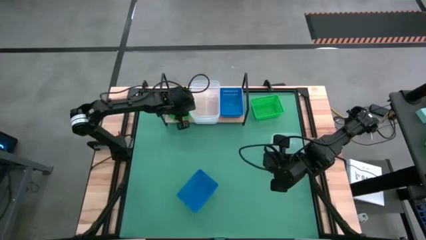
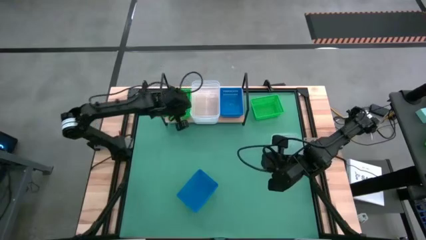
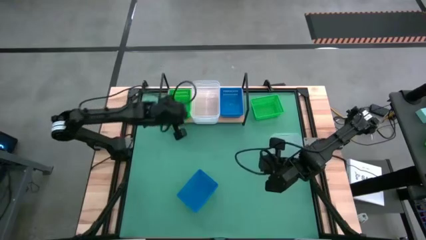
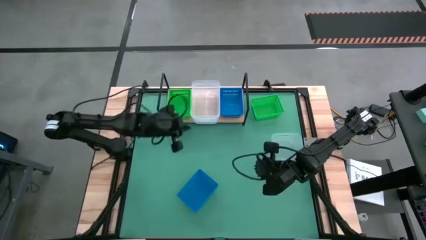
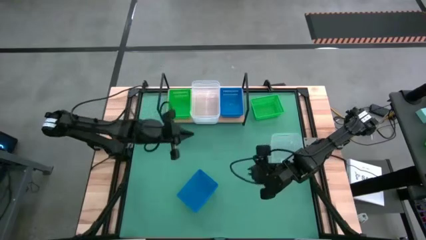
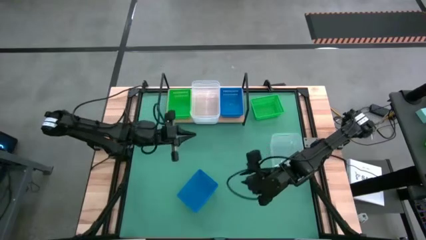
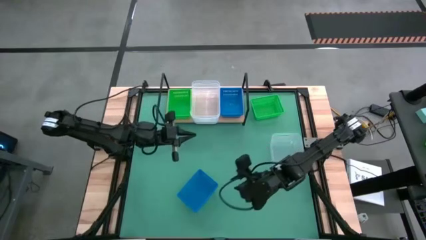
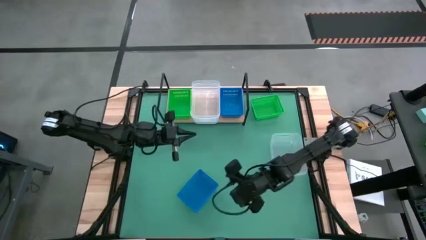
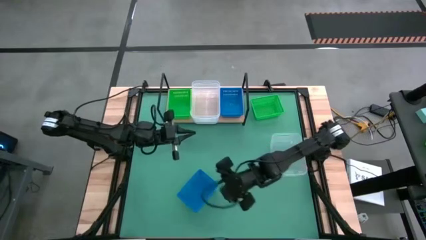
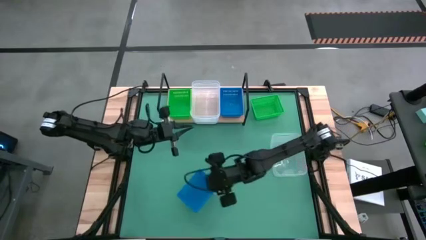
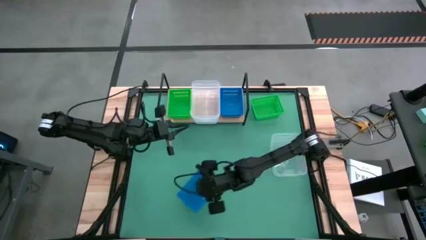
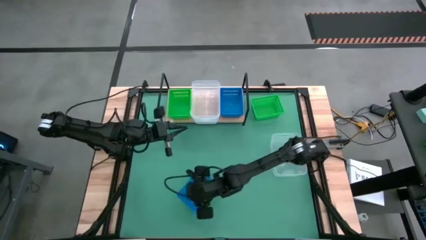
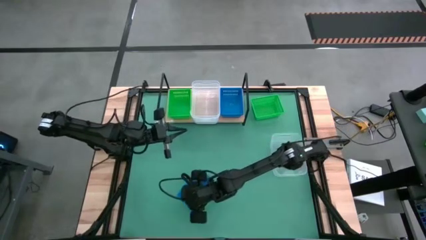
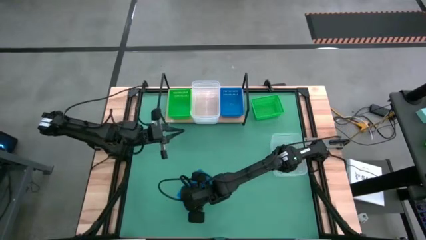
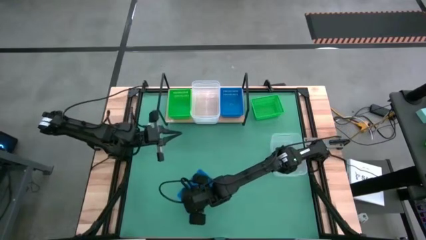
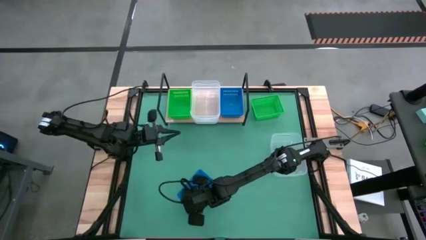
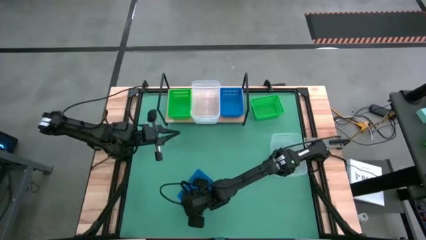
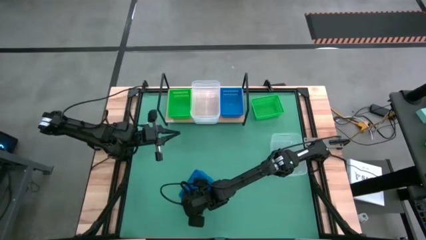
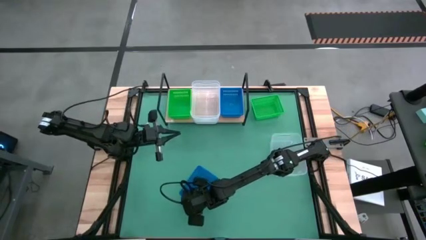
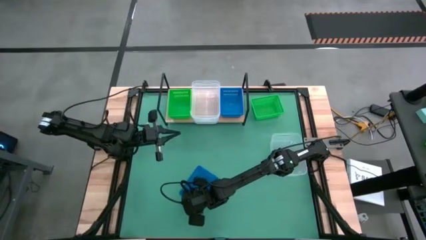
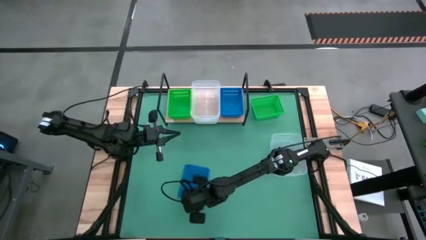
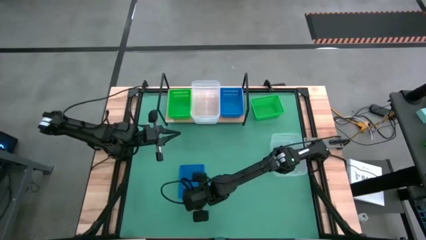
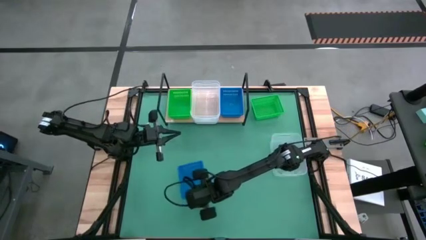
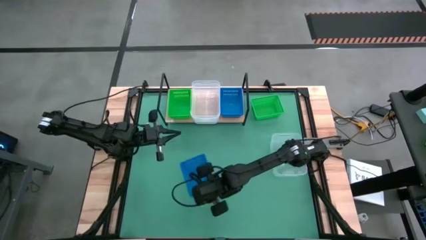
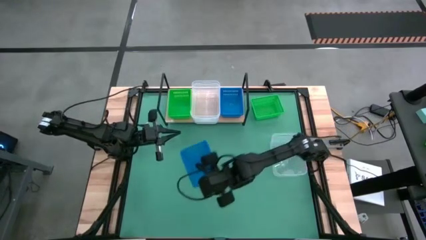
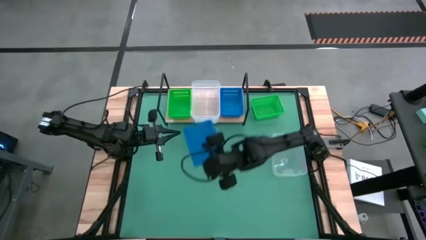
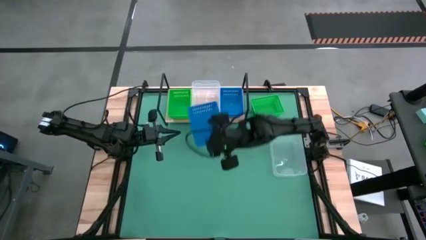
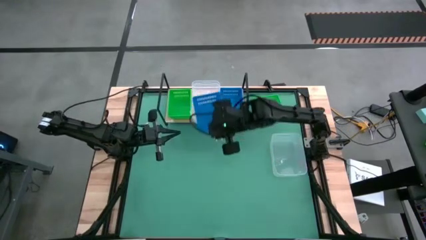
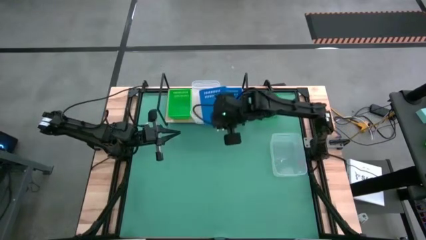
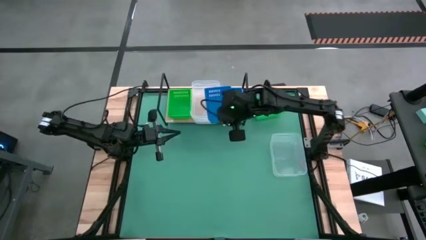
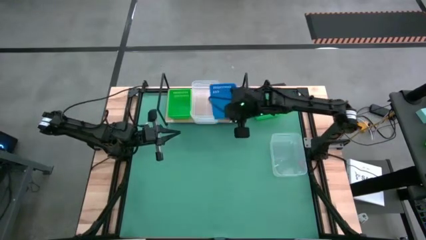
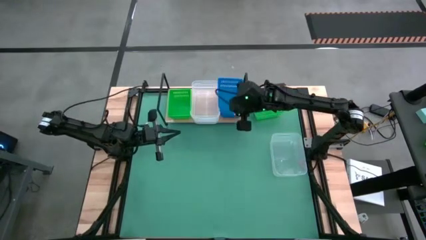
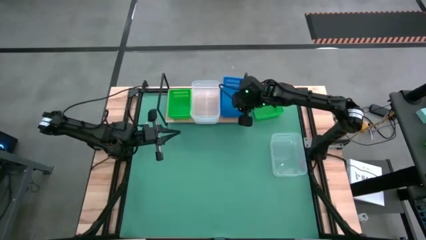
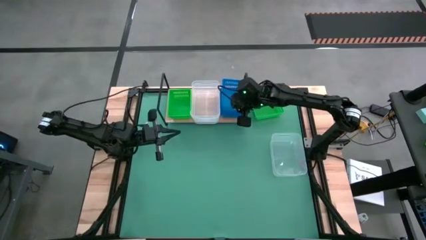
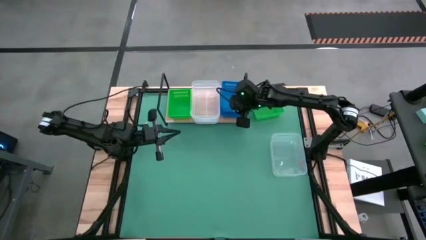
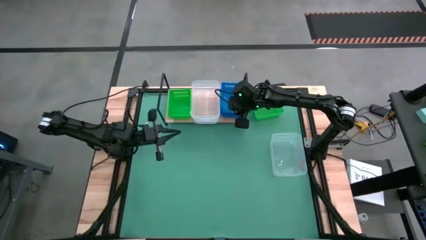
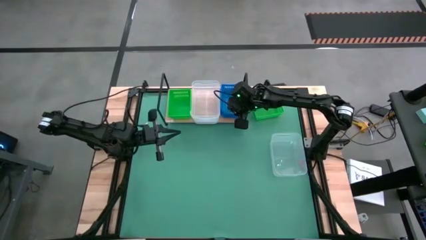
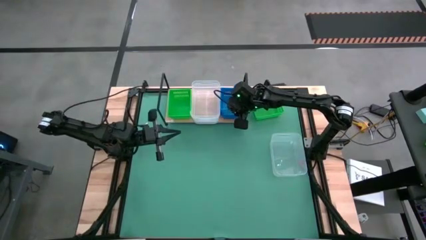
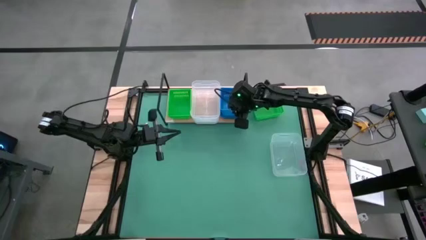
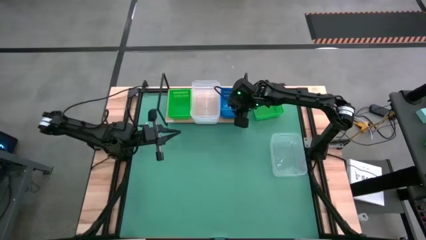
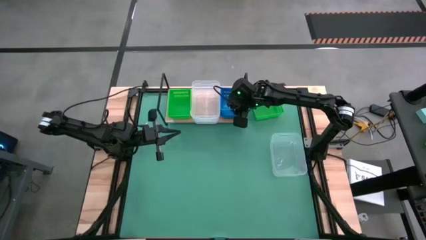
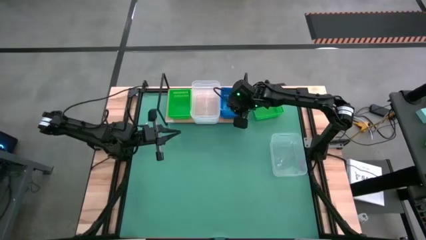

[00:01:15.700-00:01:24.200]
Task: Stack baskets on shelf by color
Stack the blue bin on the blue bin on the shelf

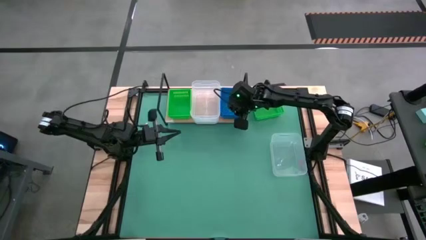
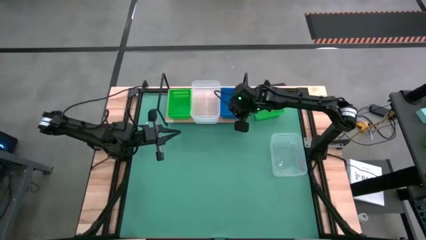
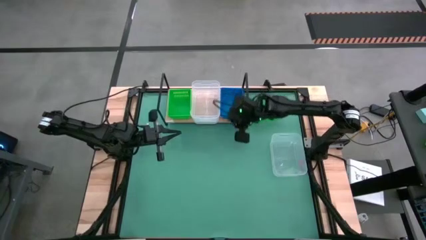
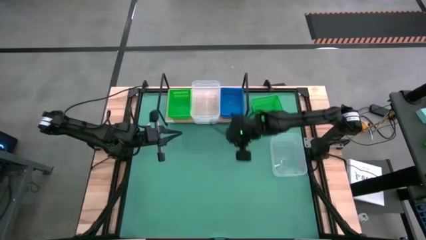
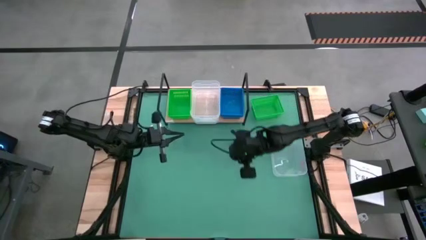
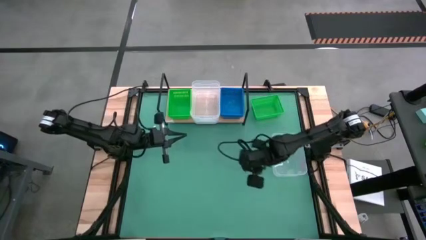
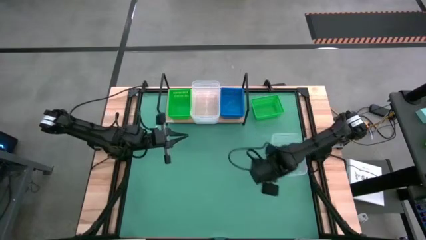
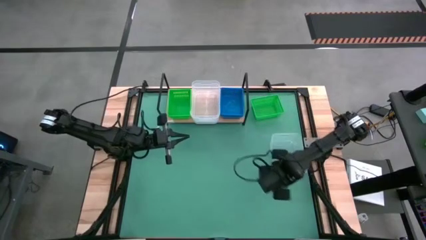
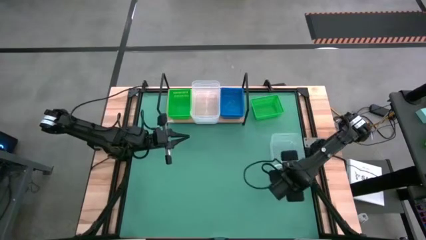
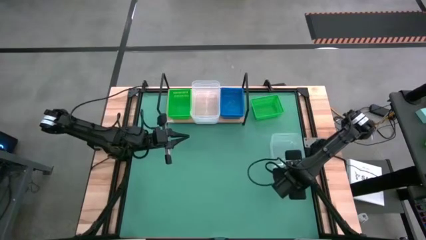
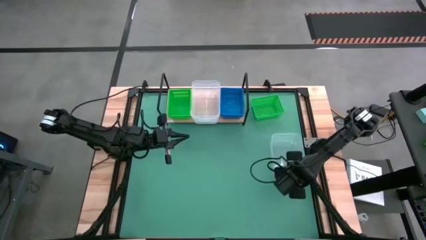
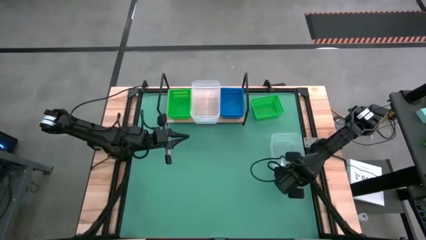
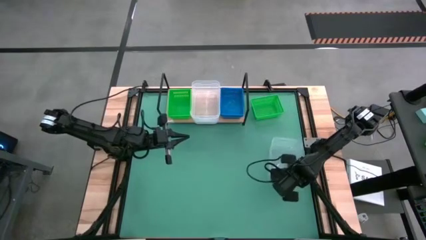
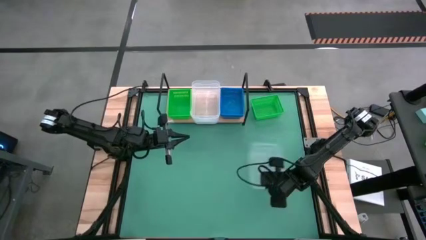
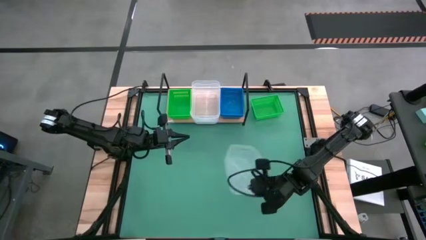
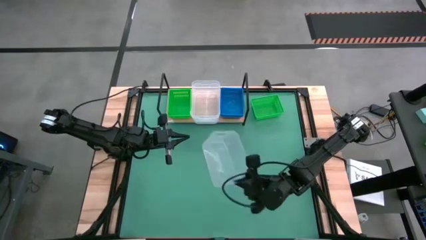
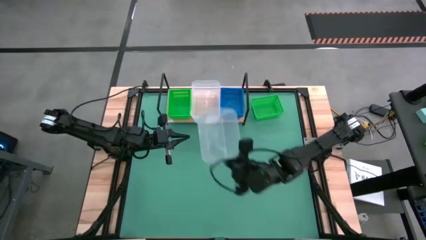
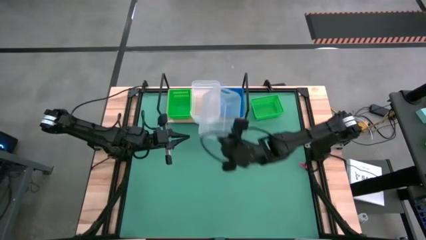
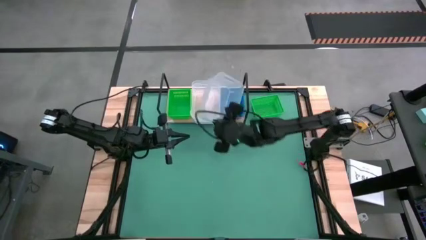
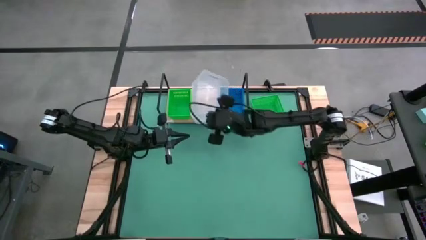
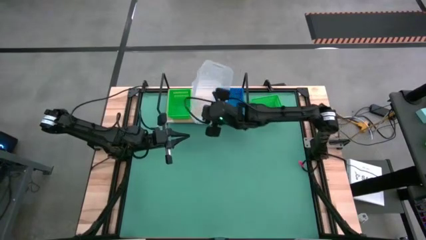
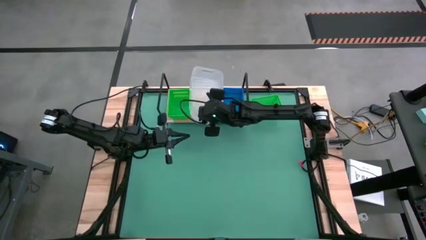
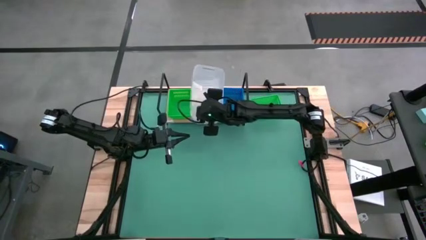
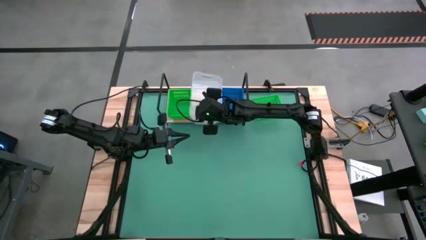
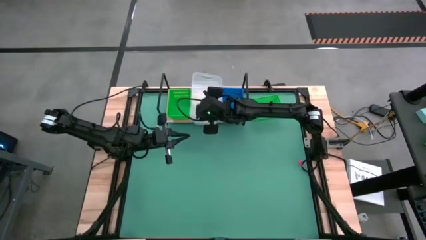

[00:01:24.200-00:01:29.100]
Stack the transparent bin on the transparent bin on the shelf

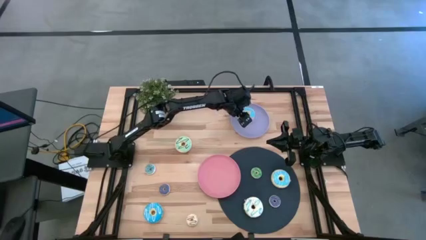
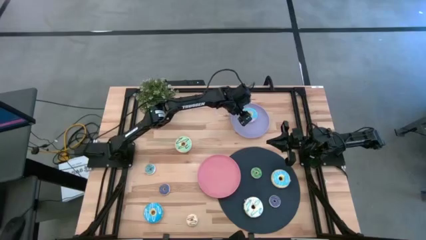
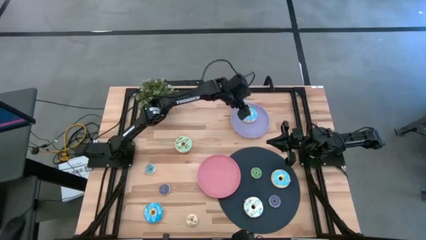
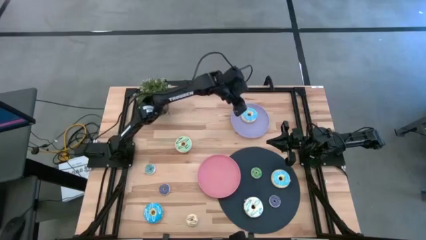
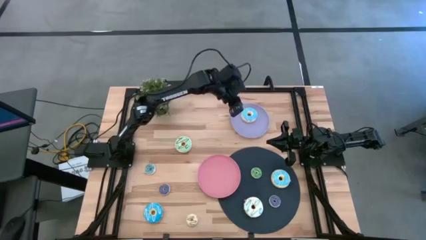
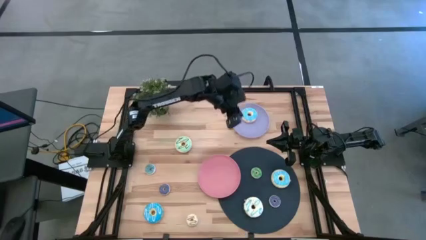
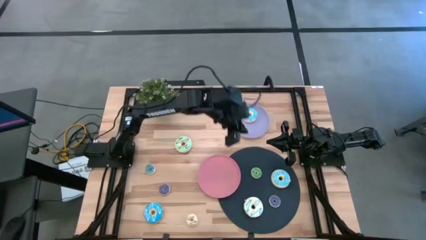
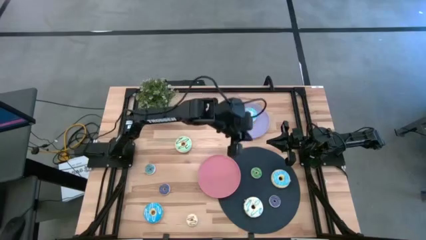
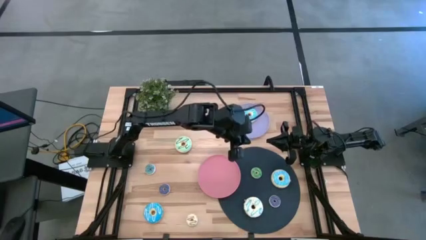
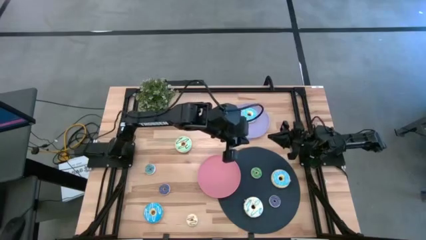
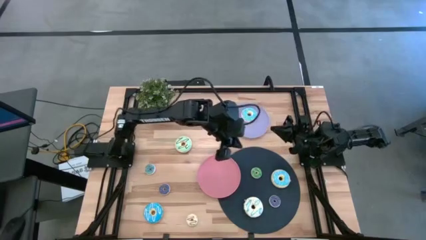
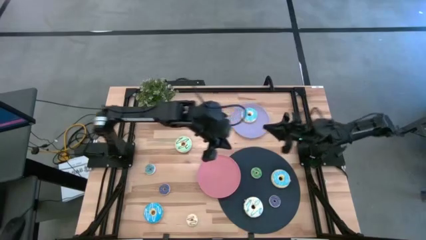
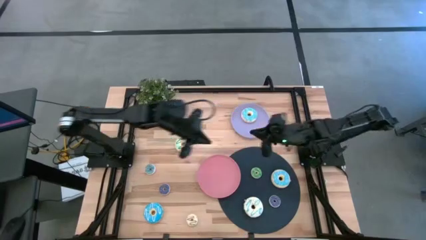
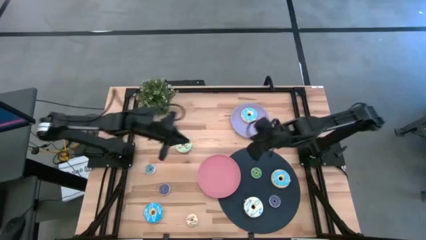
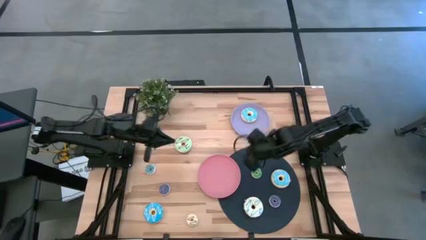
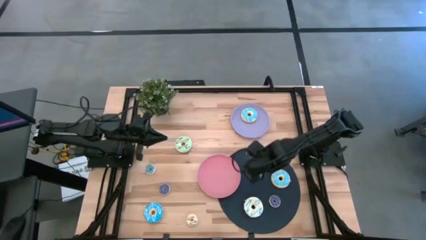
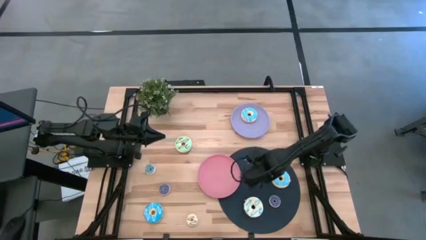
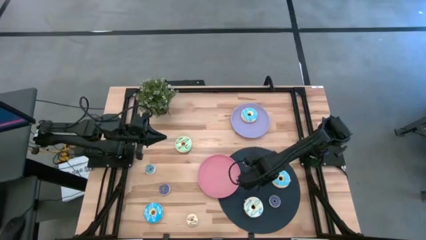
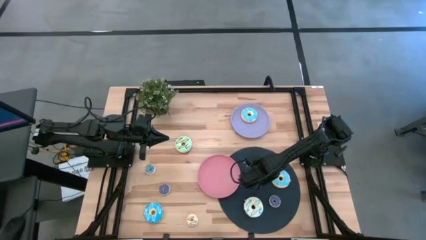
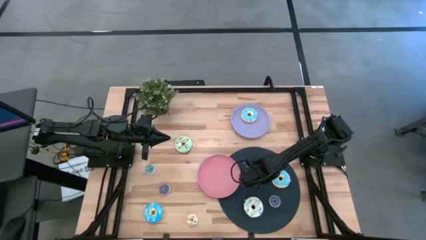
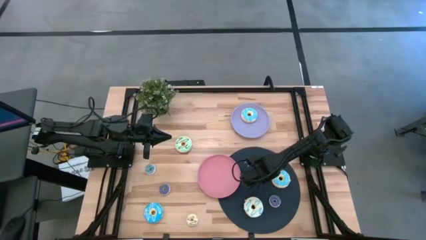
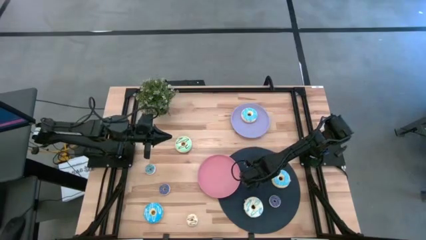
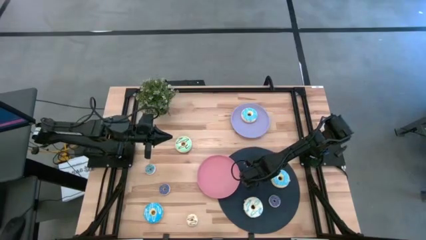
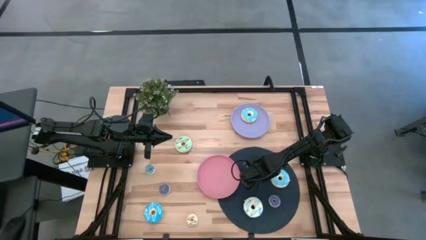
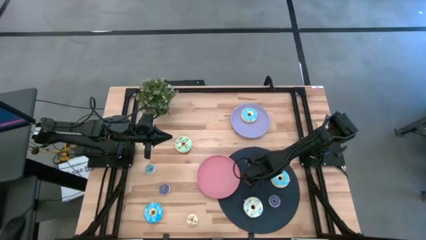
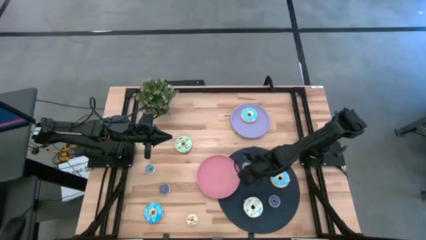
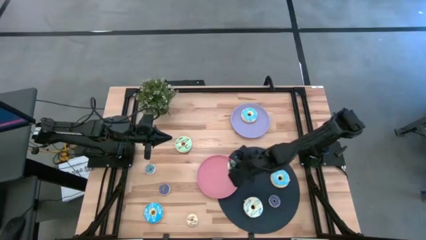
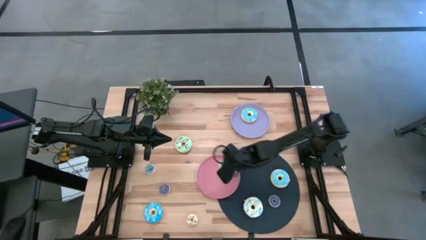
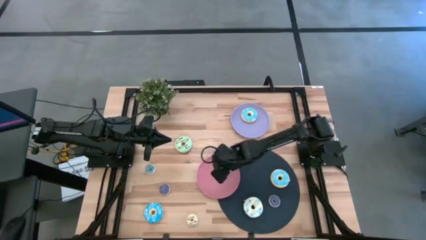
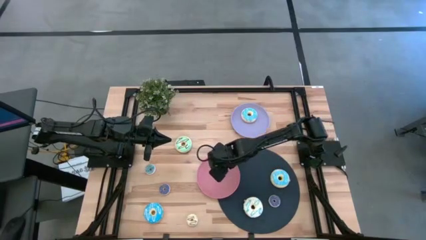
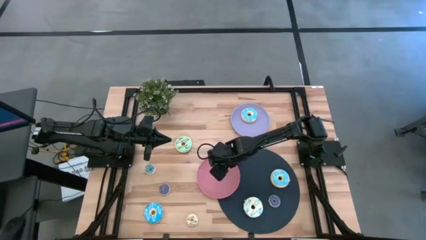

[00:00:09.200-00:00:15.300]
Task: Pick & Place donuts
Put the small green donut on the pink plate
